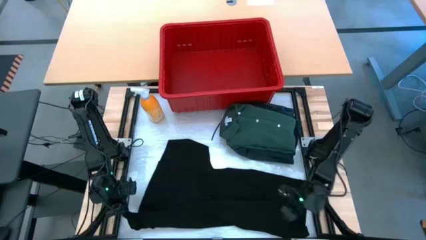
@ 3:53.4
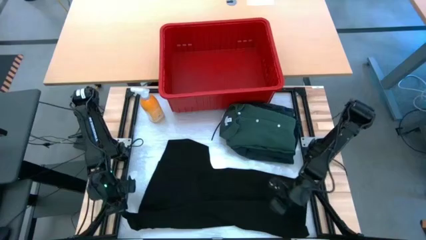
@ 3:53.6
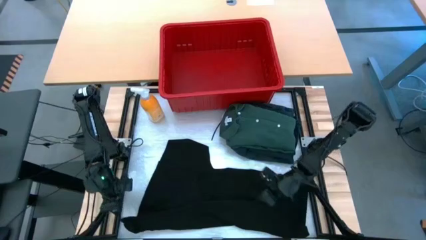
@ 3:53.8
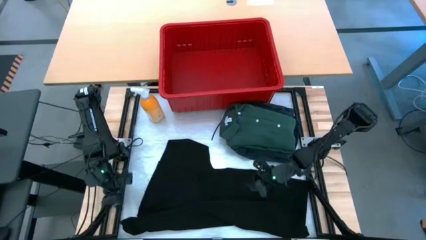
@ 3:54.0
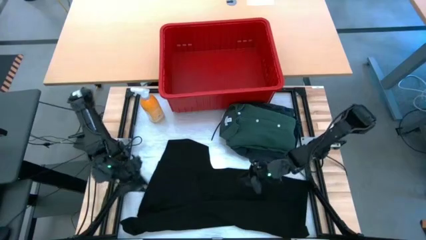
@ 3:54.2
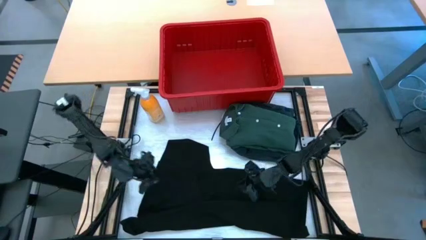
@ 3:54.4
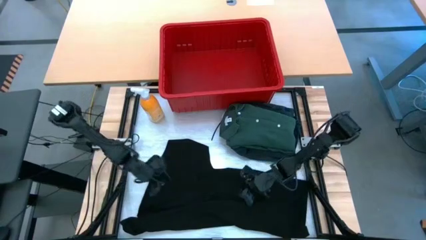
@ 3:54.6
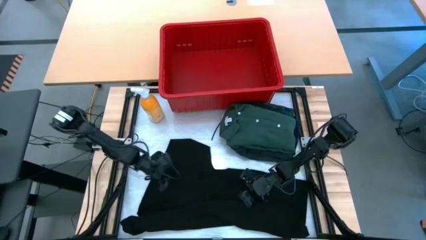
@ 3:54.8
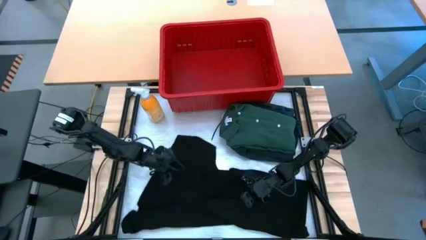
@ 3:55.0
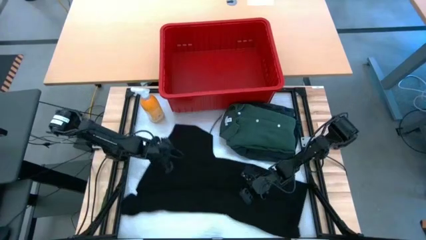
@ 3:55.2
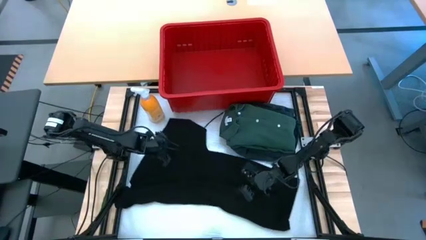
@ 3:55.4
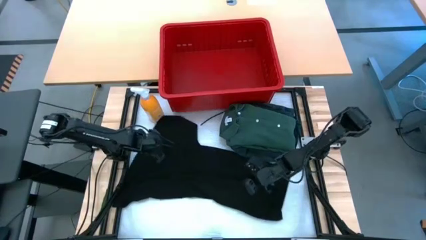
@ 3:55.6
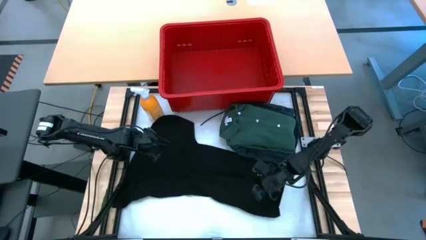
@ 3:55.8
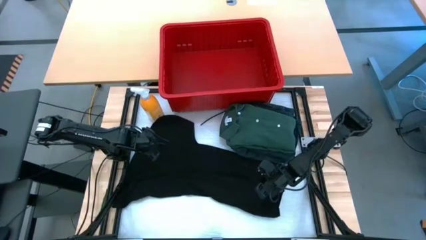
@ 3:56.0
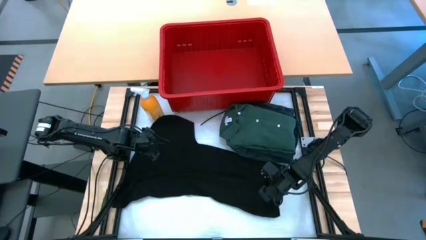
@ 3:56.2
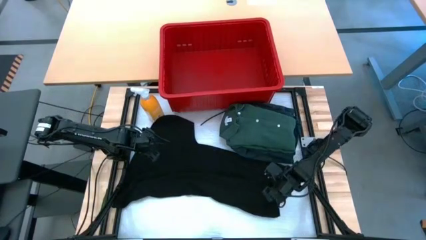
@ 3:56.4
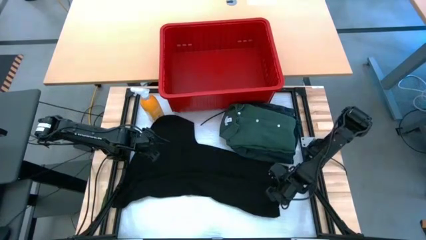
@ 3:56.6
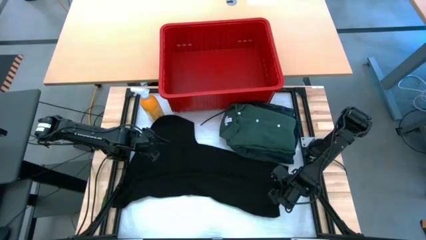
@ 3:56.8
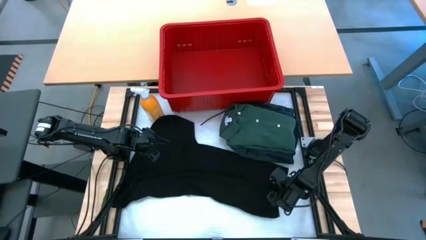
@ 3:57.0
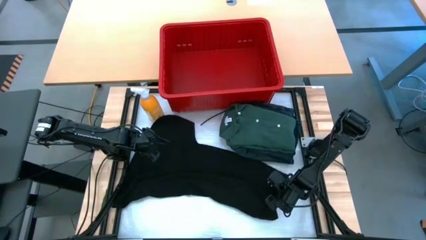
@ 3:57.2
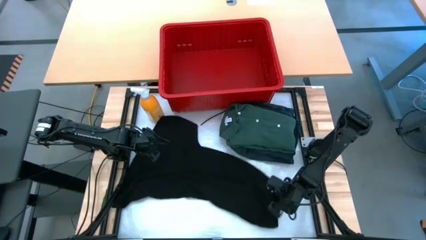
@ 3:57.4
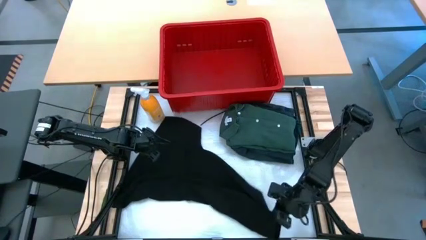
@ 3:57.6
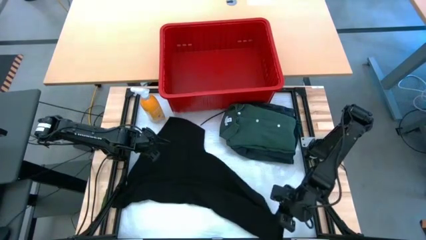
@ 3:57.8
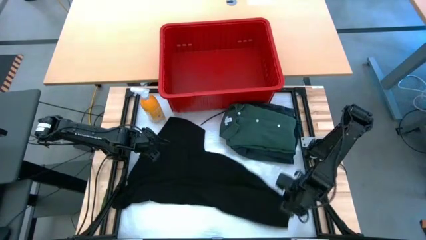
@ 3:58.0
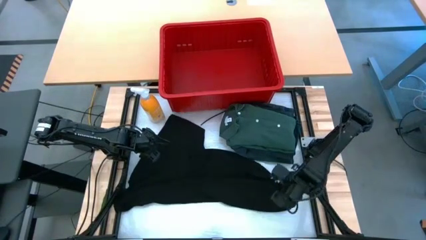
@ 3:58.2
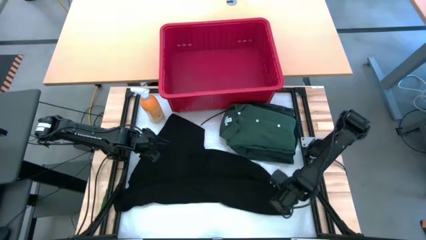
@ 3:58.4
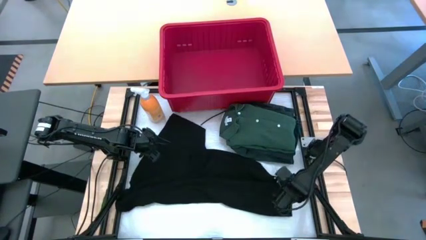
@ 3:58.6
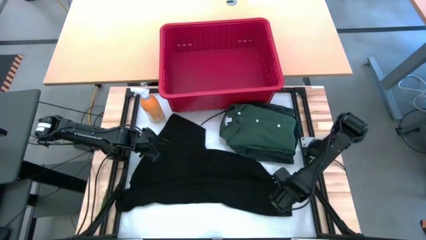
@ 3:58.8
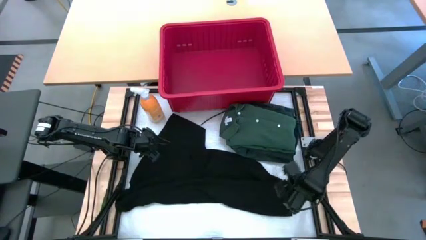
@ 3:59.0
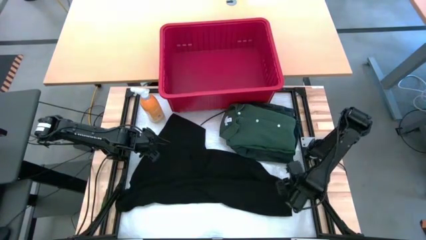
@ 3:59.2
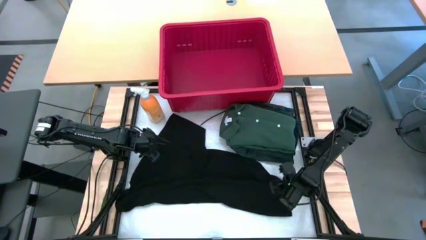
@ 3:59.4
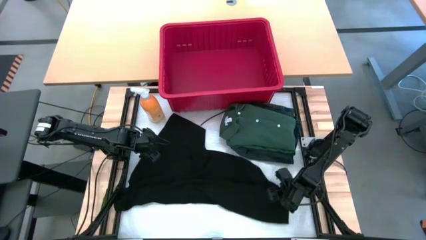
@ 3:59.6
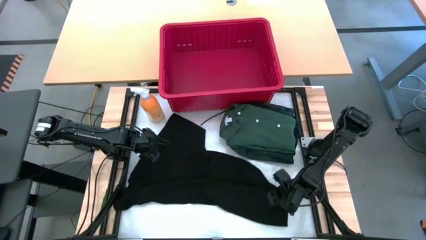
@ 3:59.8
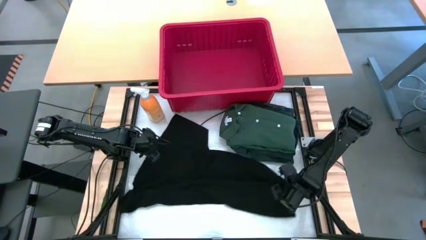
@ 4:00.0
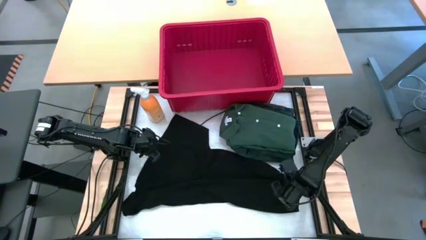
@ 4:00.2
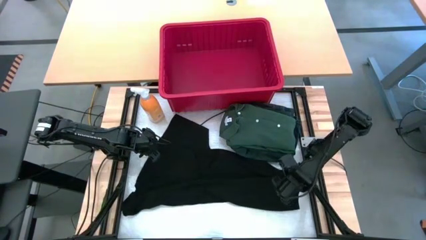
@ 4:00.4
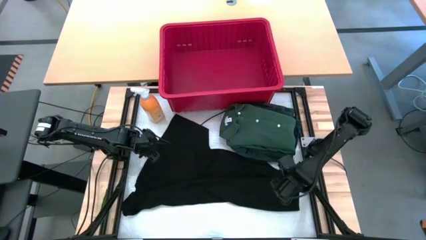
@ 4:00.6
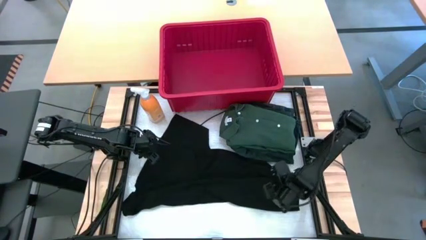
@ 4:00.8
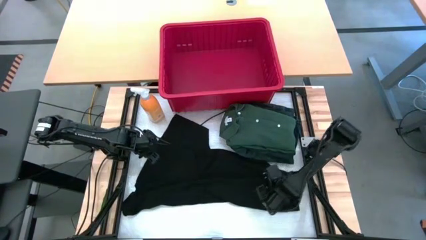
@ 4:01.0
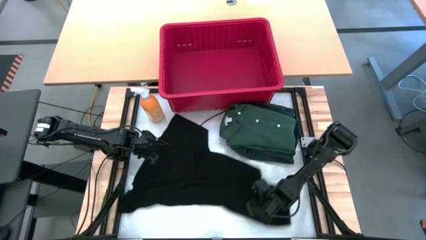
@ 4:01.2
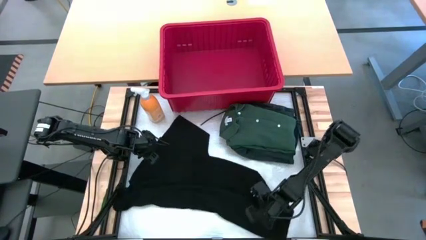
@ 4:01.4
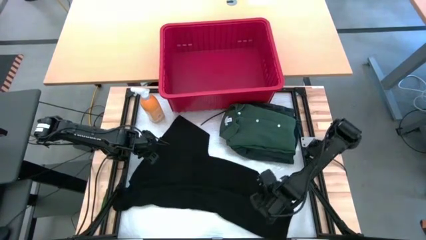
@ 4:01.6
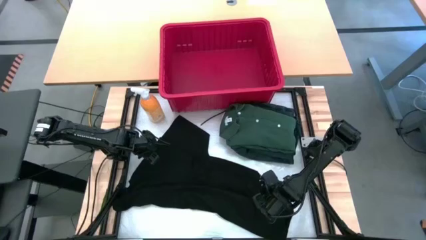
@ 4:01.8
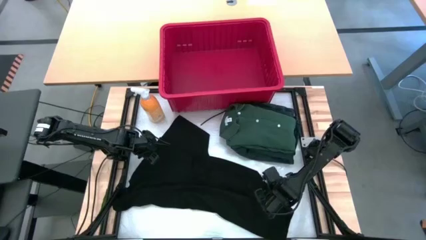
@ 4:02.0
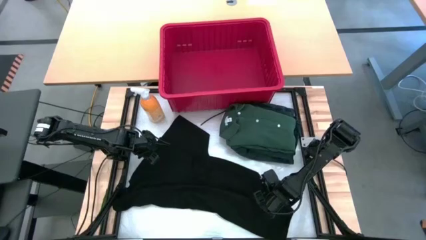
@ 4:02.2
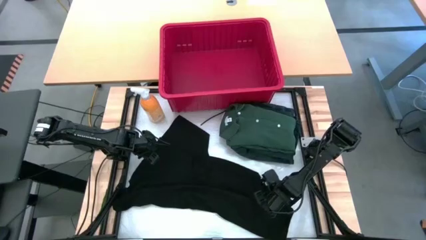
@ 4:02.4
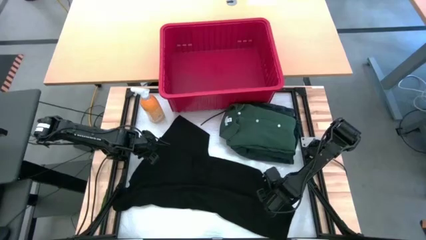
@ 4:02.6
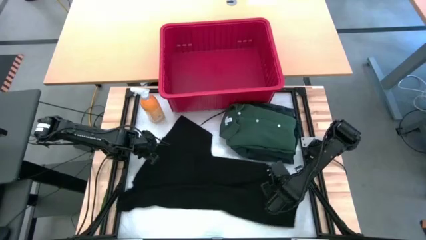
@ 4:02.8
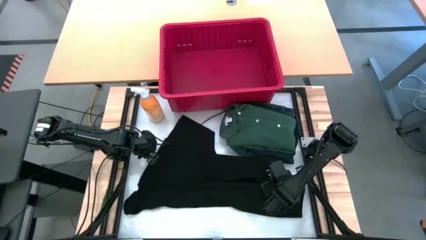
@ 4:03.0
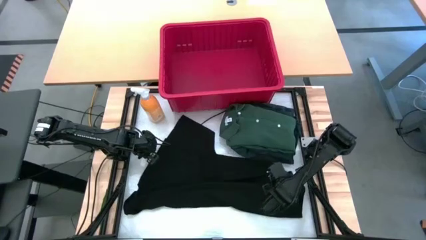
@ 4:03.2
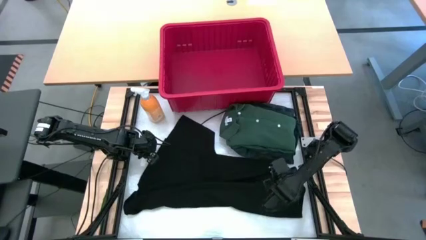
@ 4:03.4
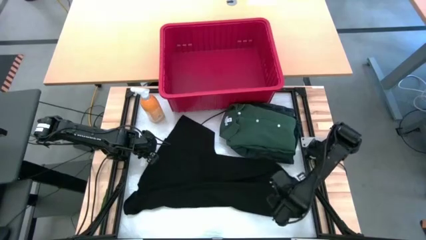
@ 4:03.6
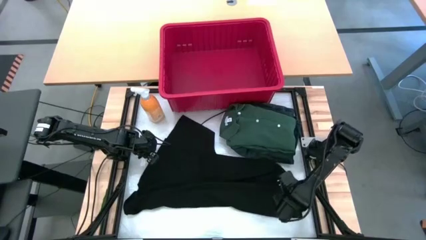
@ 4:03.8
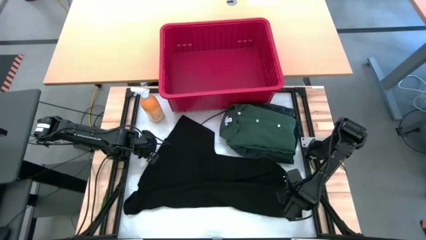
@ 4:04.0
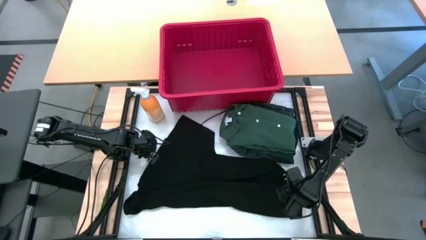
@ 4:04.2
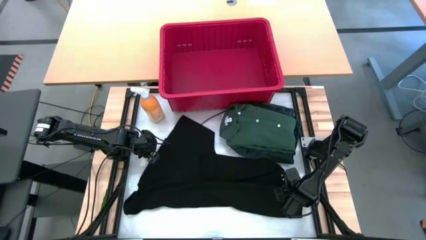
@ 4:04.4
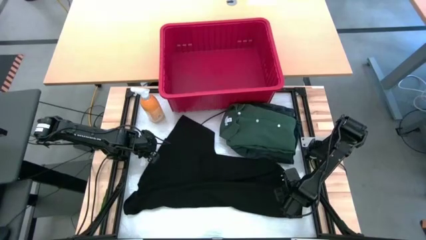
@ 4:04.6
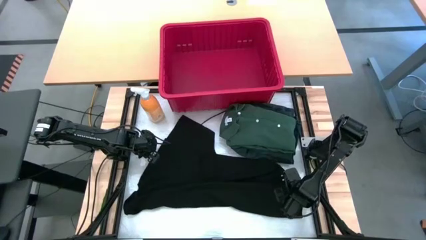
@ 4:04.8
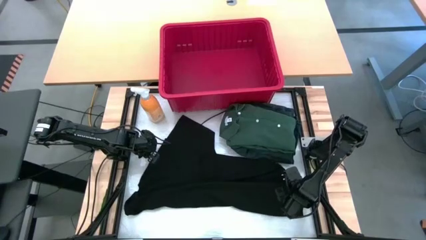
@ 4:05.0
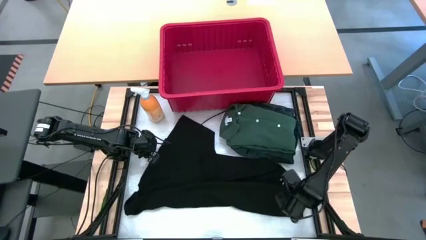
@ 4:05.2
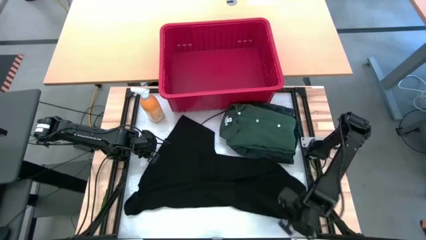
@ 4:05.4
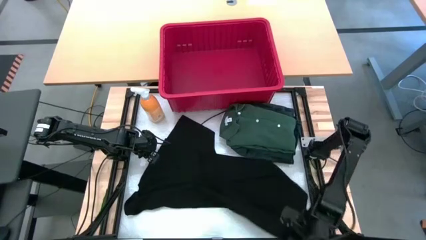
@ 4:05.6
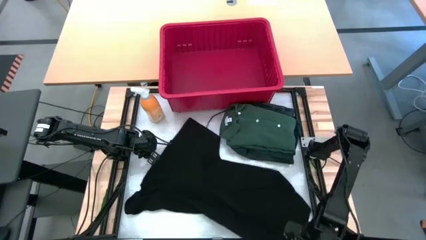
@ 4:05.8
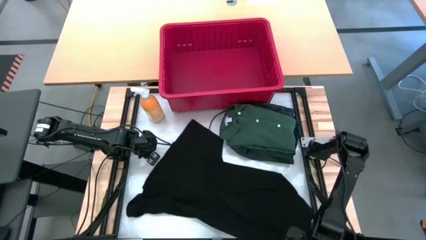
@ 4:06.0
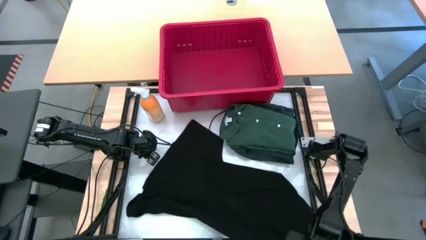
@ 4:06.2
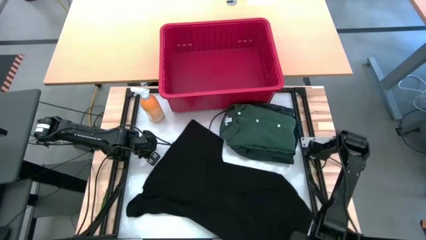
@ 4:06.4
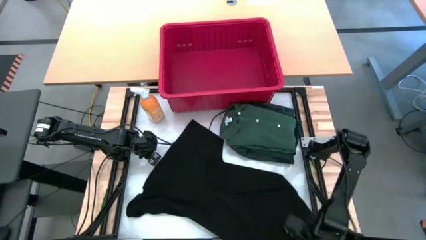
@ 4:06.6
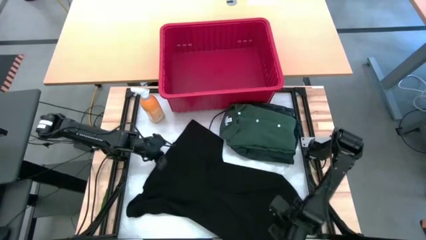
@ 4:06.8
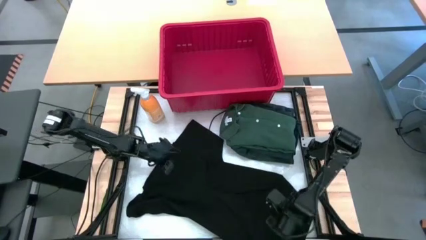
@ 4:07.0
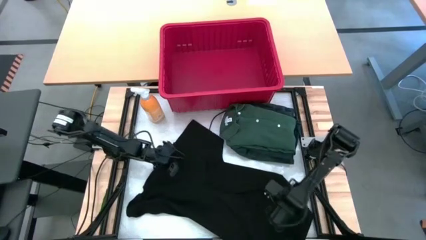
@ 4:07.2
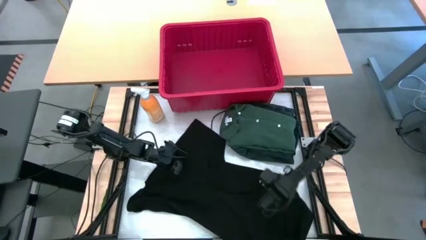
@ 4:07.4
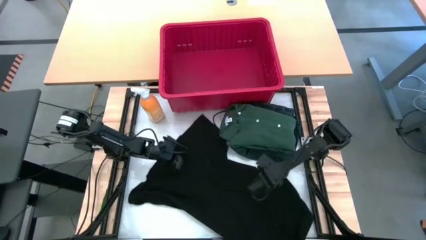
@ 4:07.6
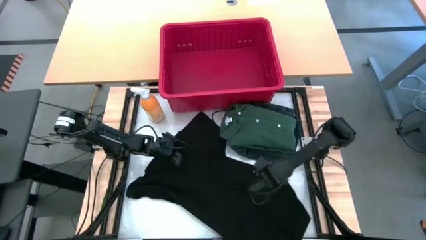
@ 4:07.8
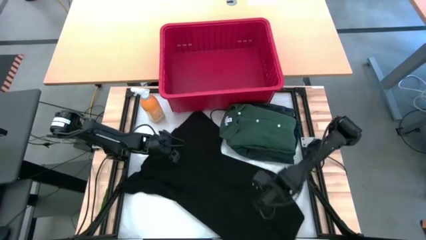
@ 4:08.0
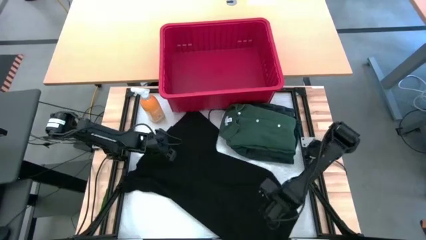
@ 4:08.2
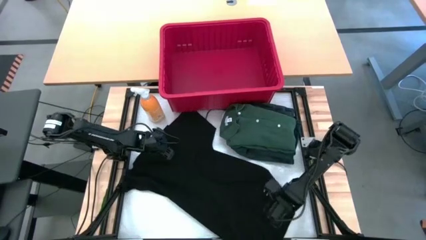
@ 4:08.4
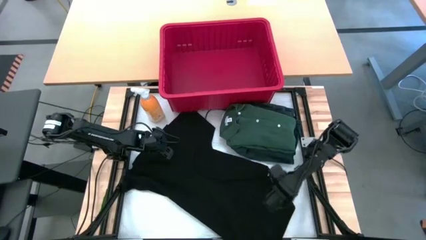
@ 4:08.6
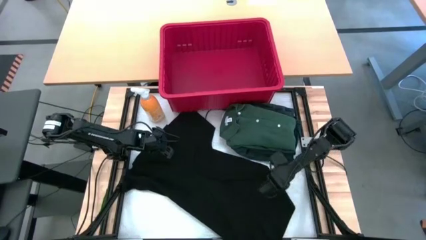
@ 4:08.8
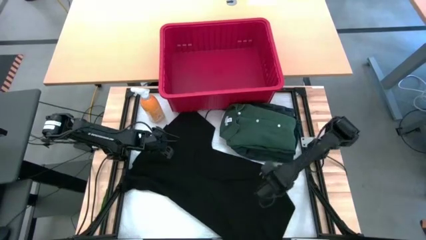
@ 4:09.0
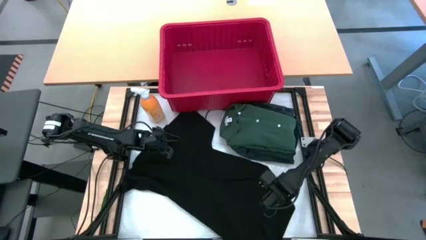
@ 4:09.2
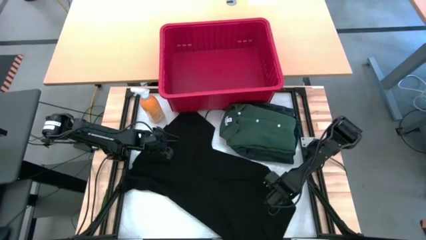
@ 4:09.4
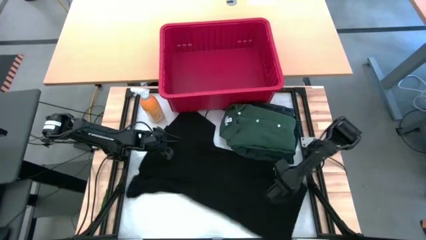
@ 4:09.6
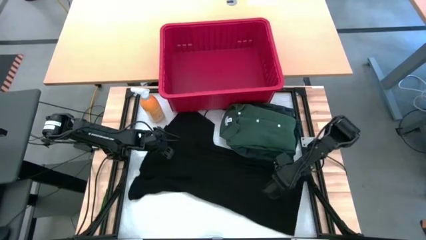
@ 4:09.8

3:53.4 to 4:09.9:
Task: Fold laundry
Fold the black shirt
